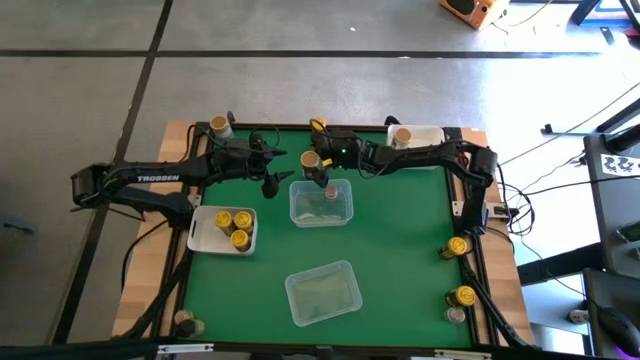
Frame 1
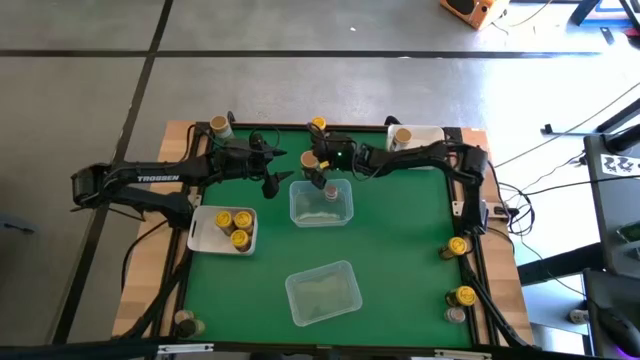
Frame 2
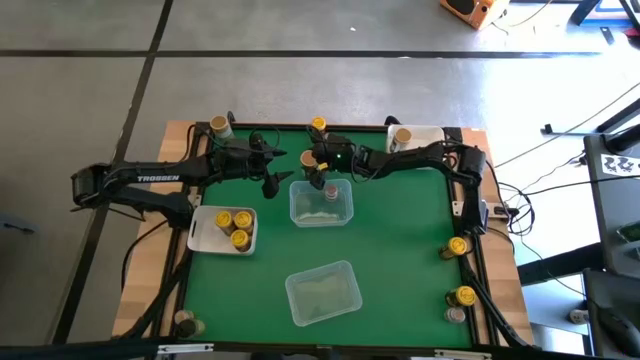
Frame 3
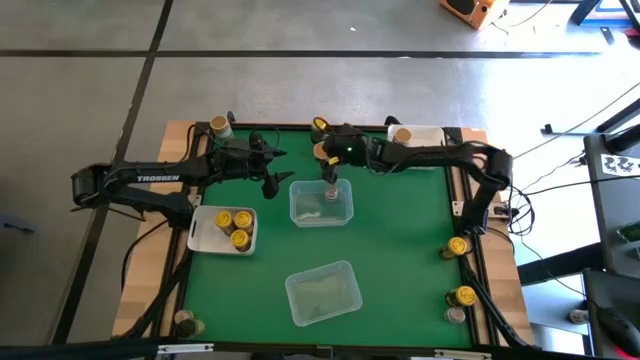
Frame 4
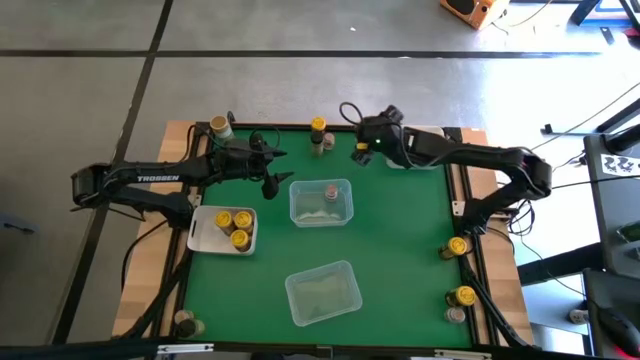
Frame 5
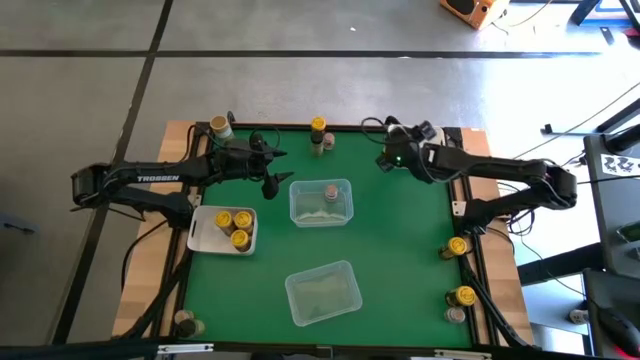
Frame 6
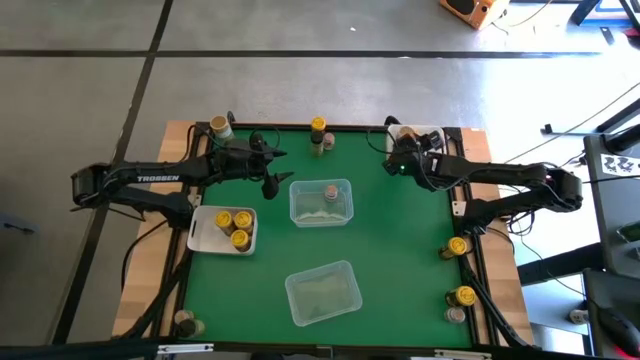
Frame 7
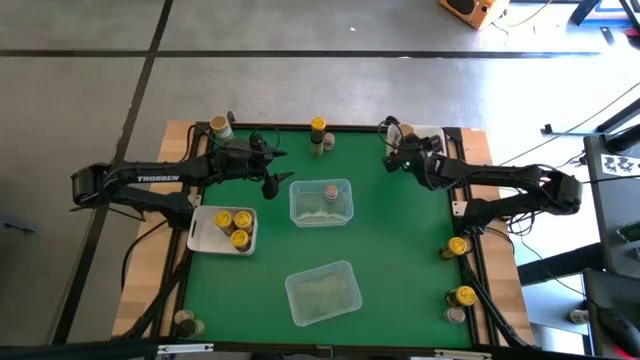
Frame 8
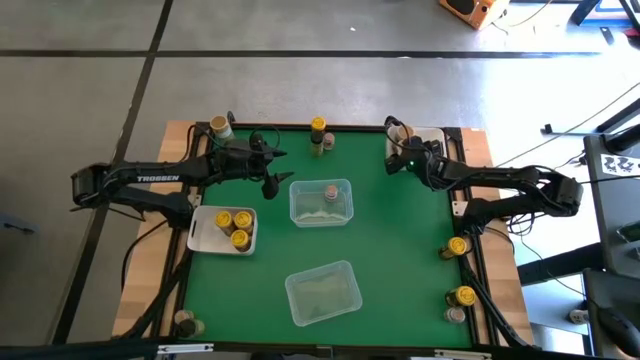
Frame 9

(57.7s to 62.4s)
Task: Sort spices by type
Put the golden spice bottle into the top white bin

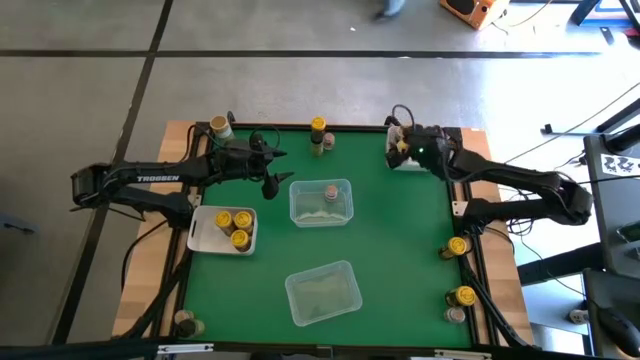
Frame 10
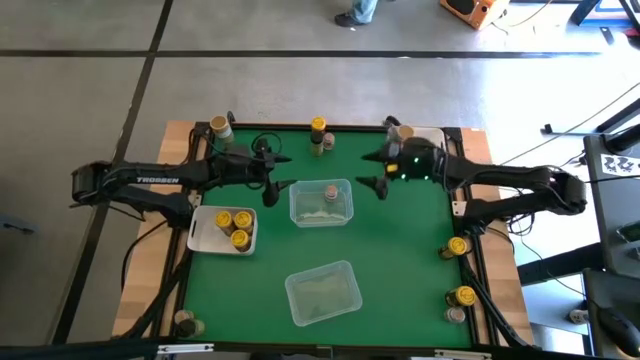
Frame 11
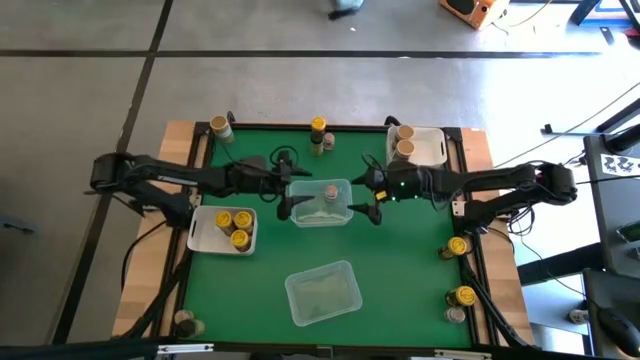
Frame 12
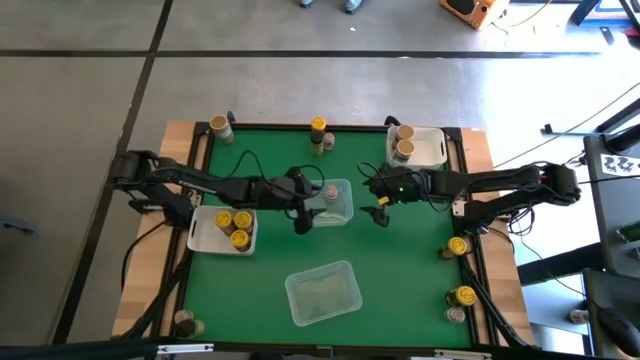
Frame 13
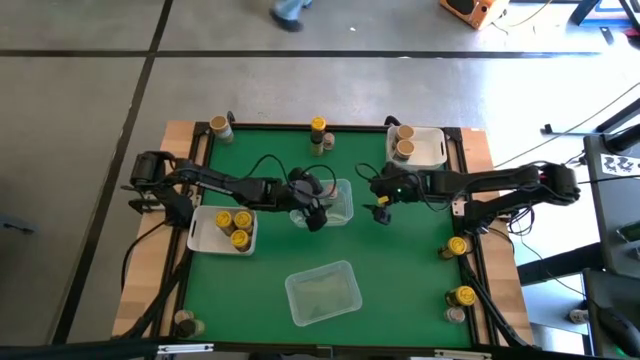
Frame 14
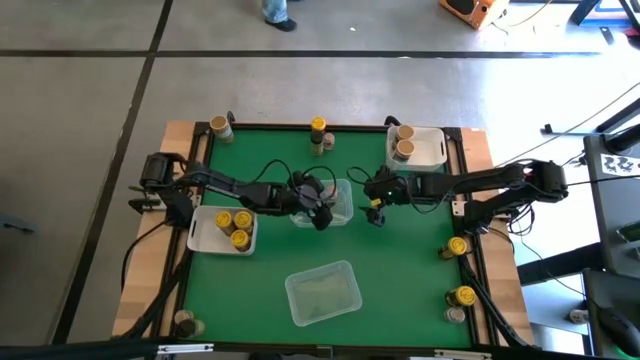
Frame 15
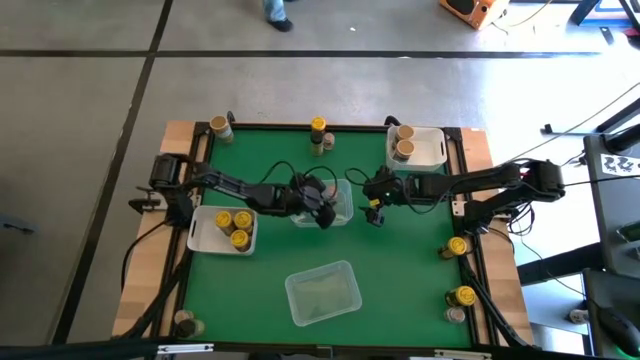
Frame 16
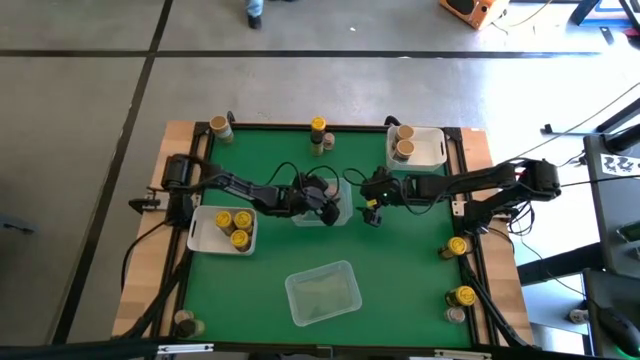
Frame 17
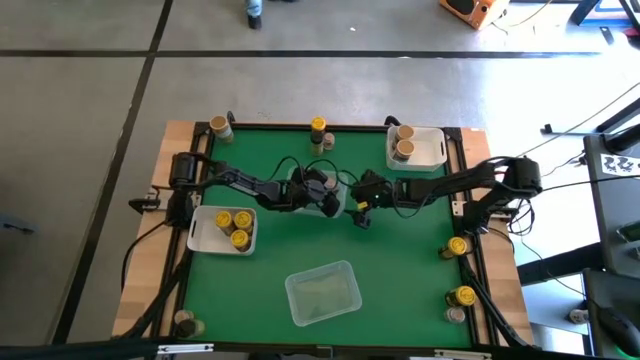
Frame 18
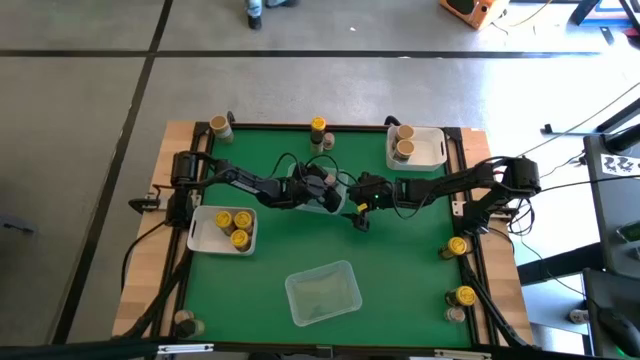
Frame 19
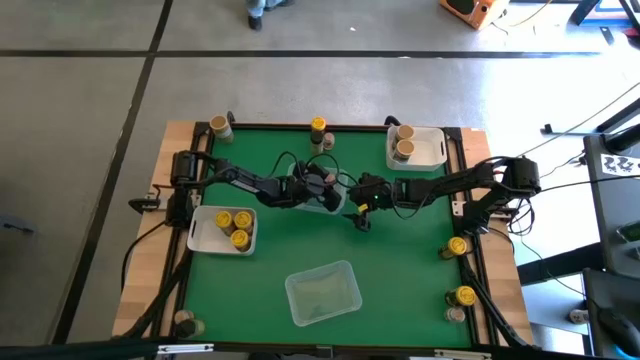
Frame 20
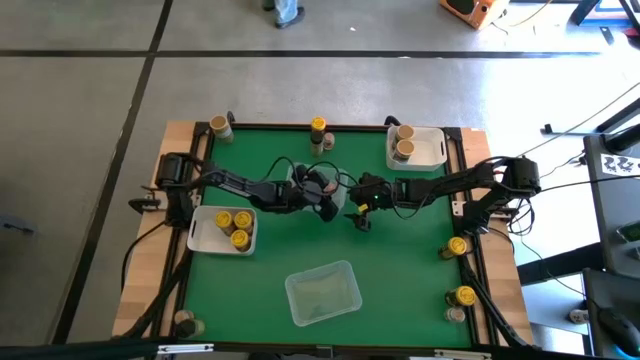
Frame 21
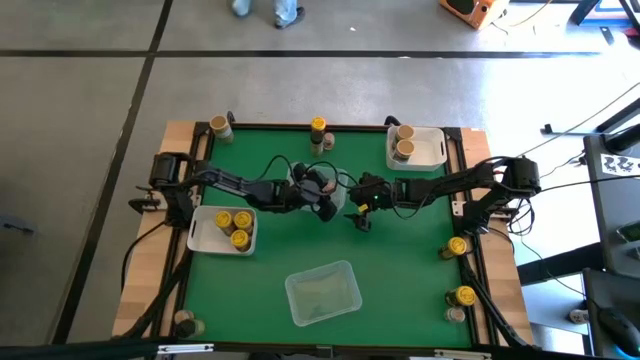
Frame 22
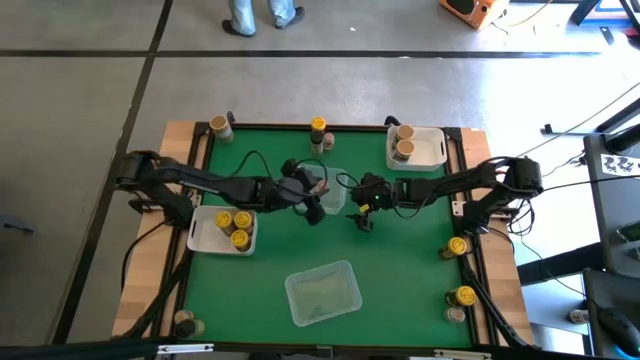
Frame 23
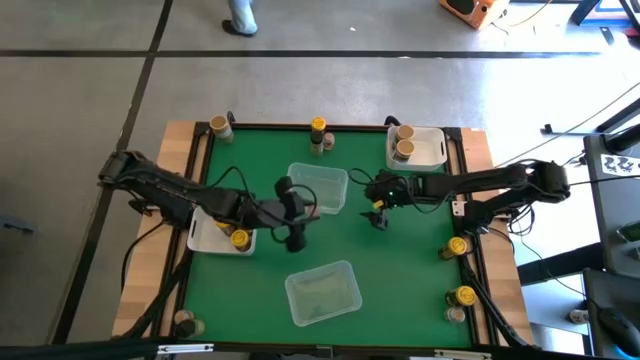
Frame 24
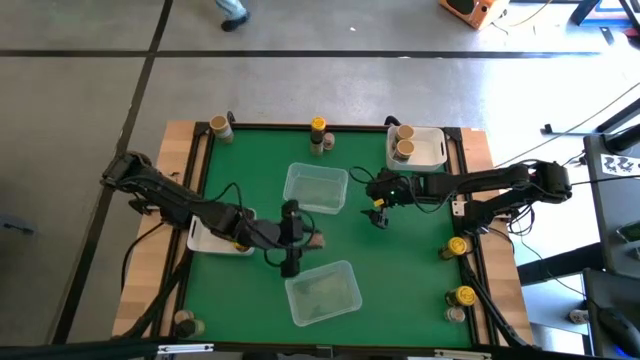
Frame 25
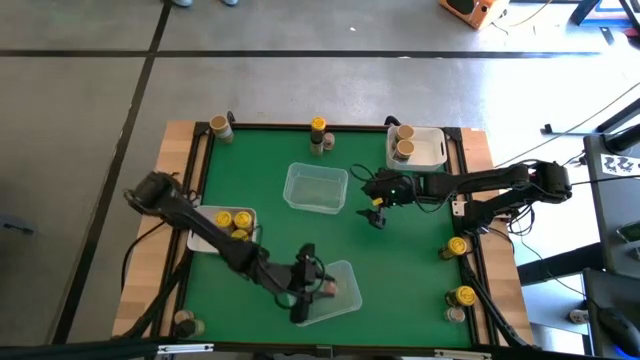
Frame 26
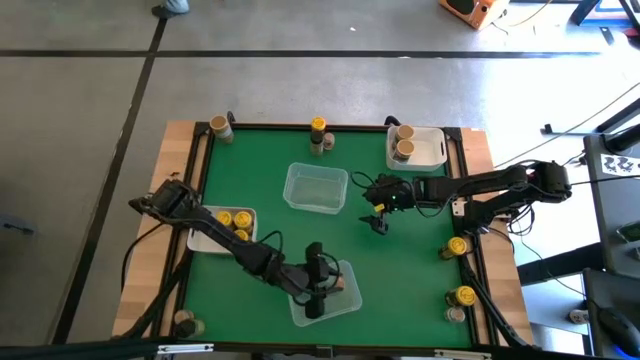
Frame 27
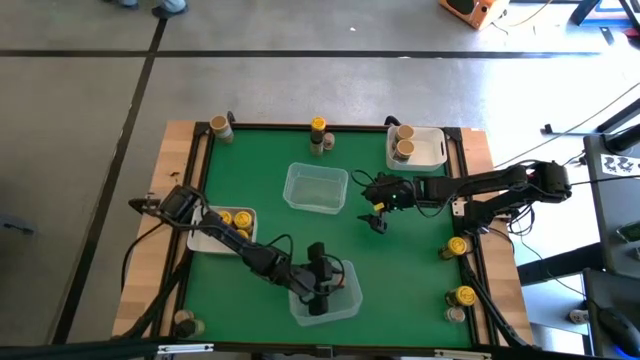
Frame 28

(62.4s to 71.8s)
Put the brown spice bottle into the bottom transparent bin

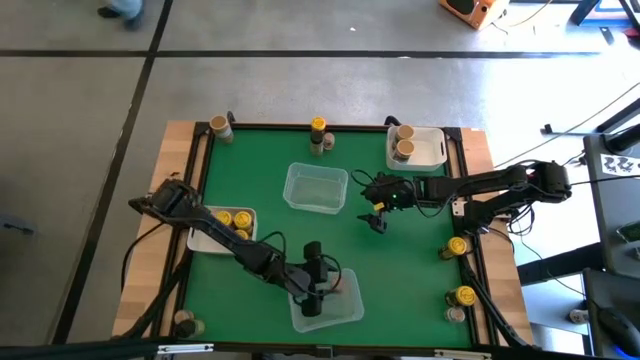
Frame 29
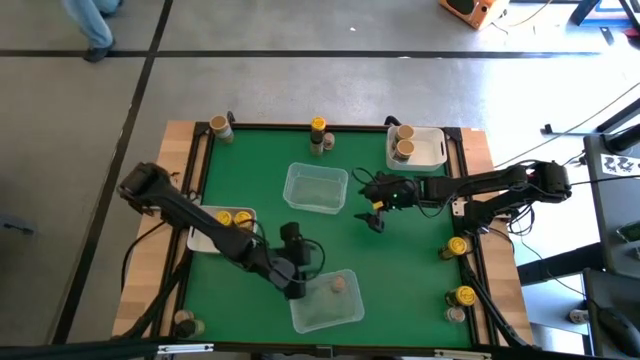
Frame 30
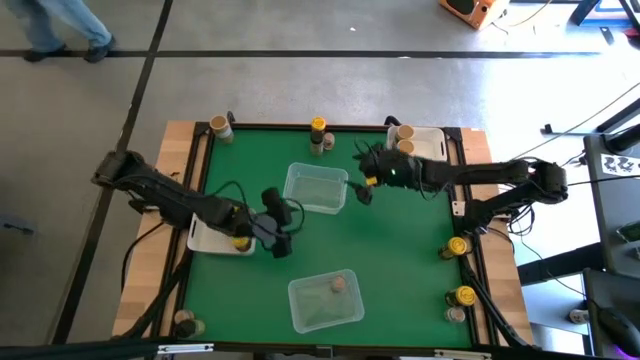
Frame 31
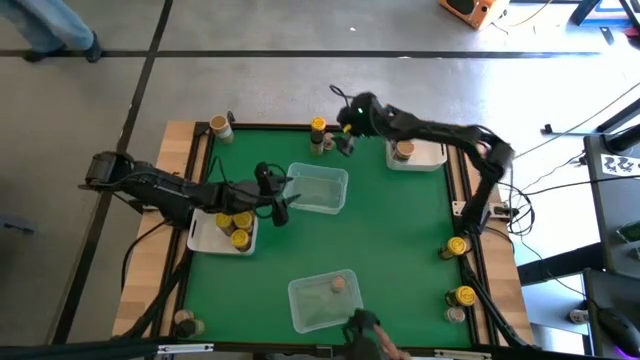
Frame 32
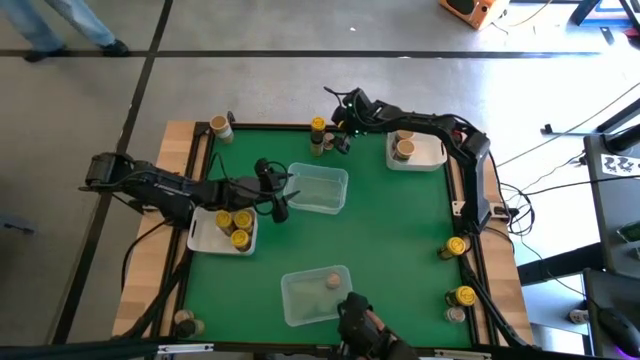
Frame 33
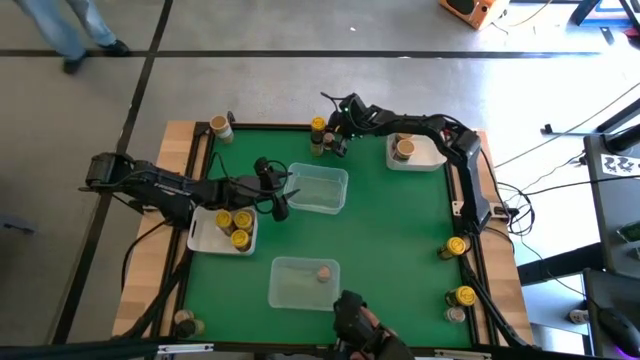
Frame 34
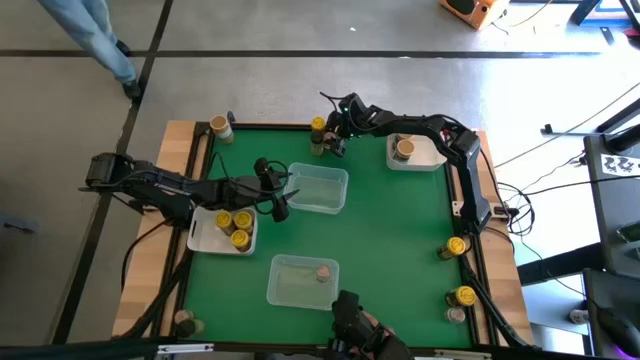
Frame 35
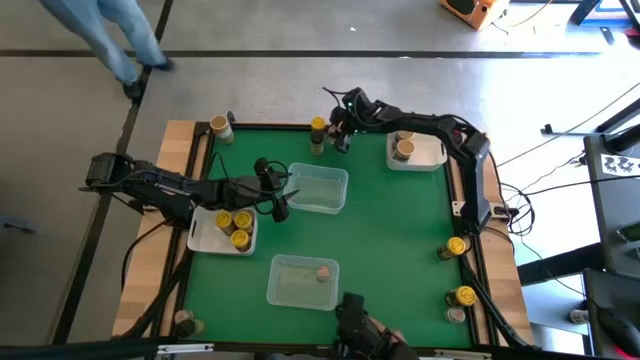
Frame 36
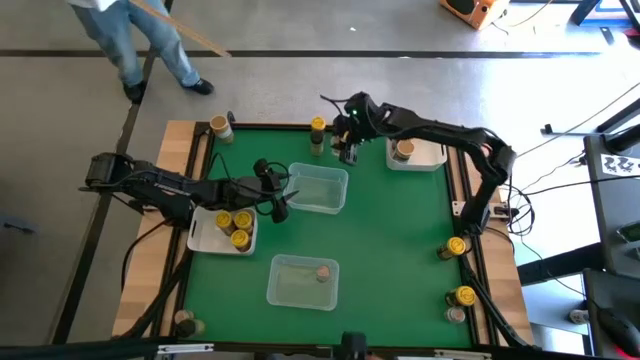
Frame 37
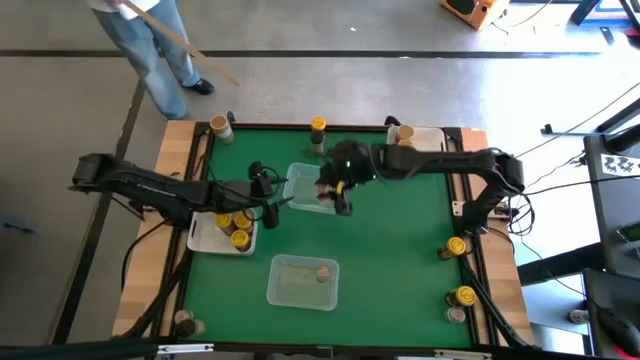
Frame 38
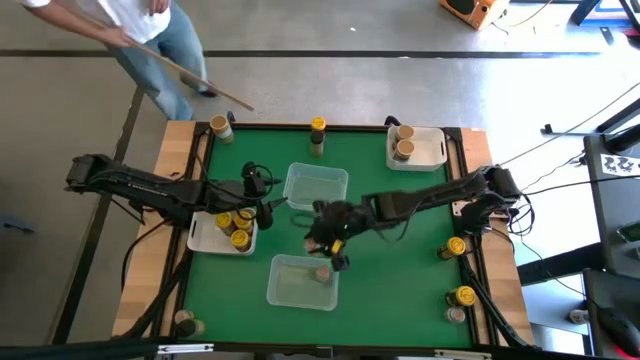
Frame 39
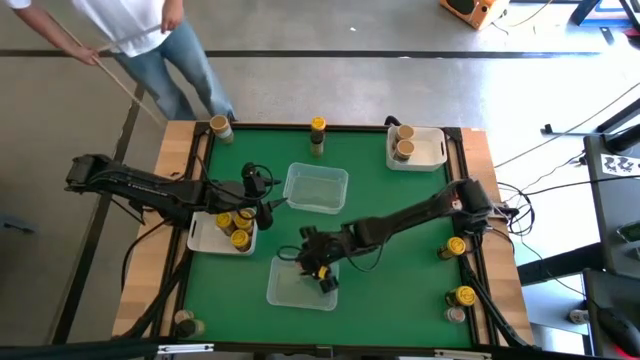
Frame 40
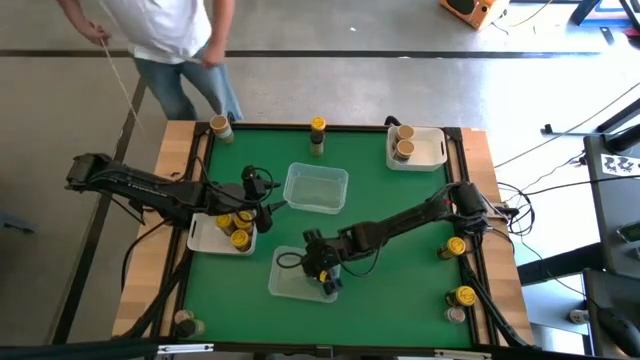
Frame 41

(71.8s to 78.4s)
Put the brown spice bottle into the bottom transparent bin

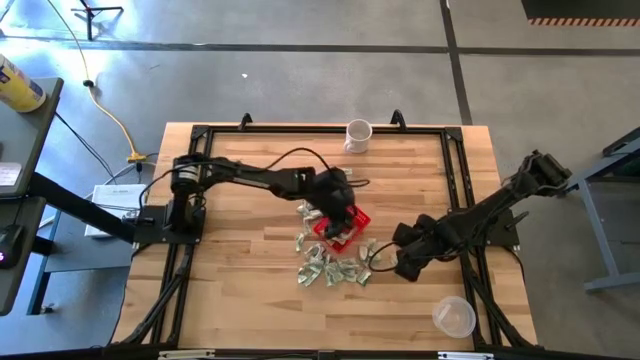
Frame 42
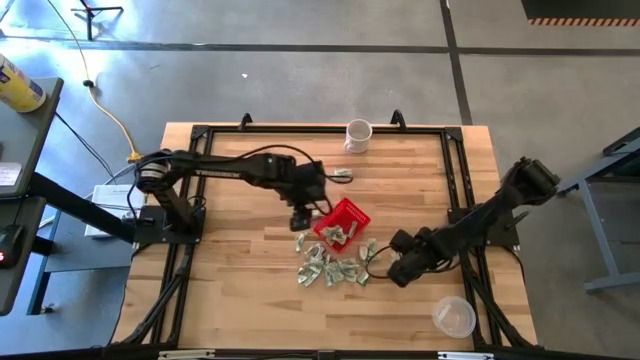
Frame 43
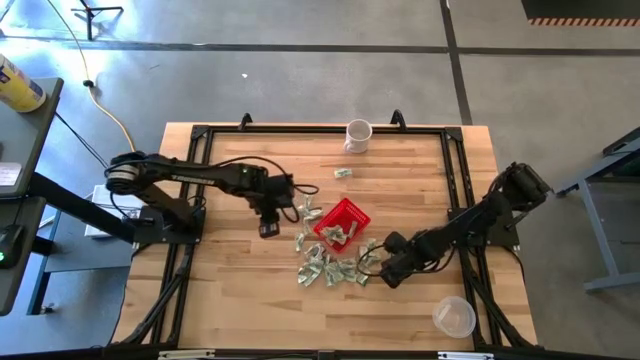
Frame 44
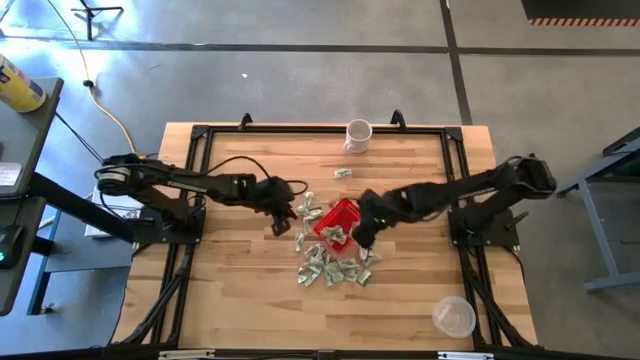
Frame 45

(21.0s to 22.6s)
Task: Pick and place items into bin
Put the white stevia packet into the red bin

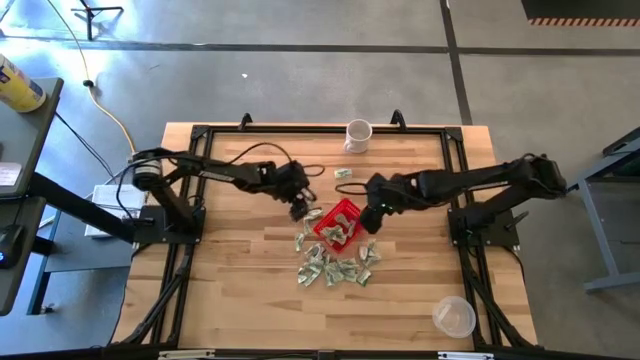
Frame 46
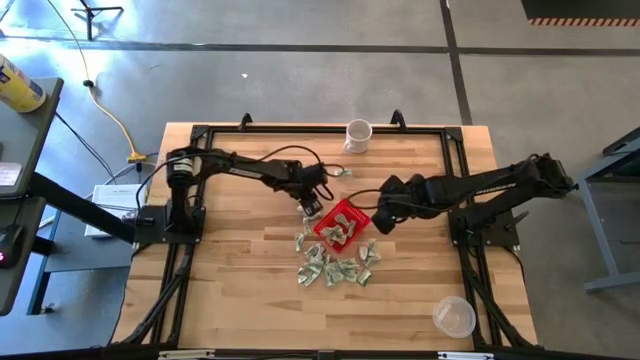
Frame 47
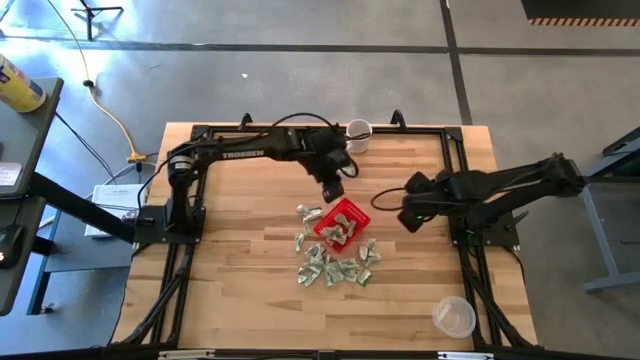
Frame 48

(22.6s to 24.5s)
Put the white stevia packet into the red bin
